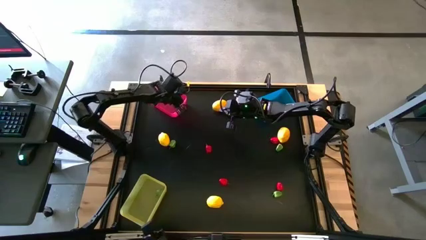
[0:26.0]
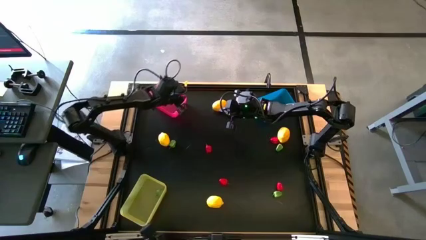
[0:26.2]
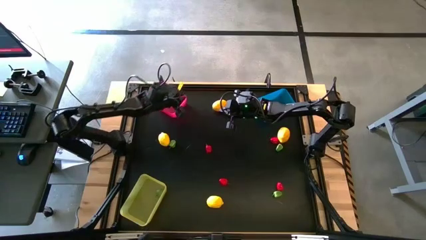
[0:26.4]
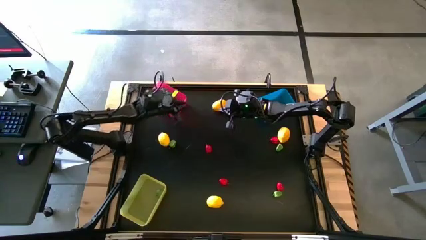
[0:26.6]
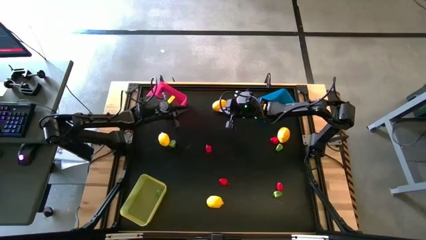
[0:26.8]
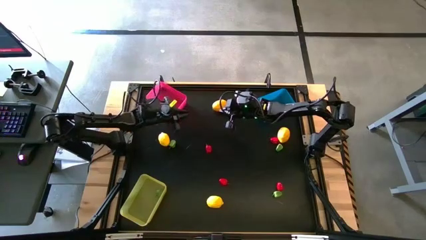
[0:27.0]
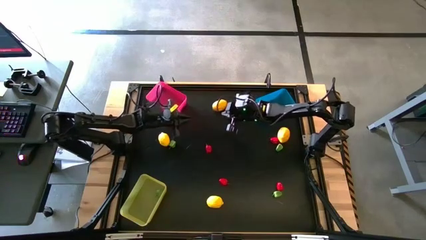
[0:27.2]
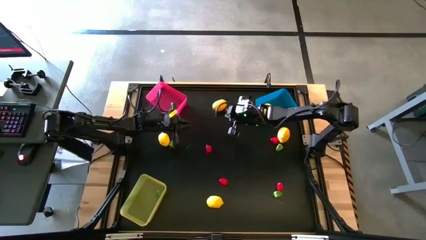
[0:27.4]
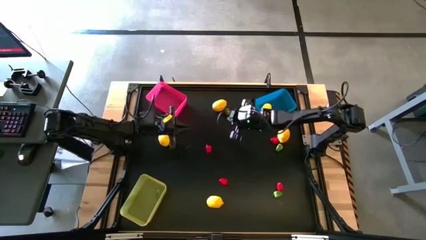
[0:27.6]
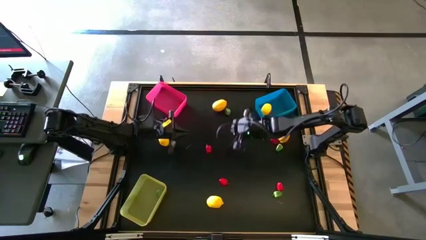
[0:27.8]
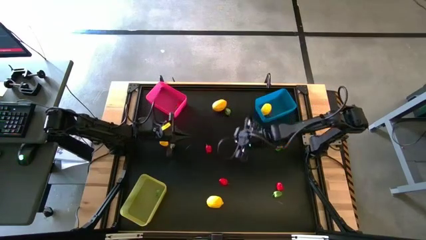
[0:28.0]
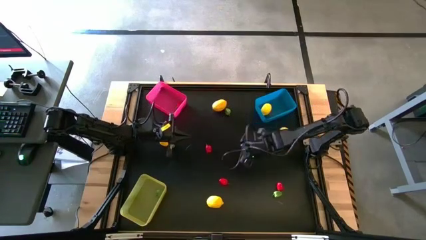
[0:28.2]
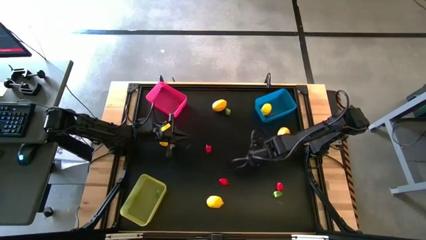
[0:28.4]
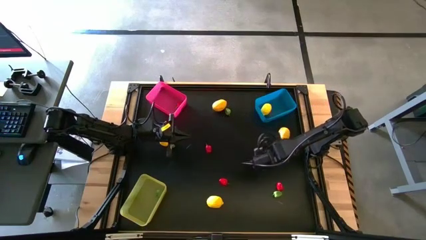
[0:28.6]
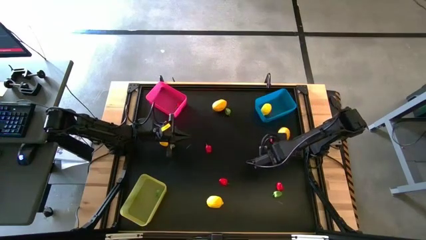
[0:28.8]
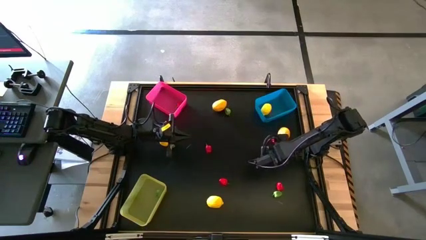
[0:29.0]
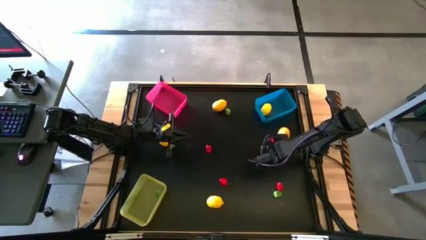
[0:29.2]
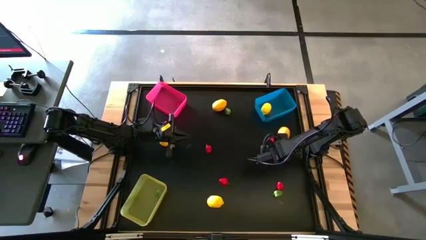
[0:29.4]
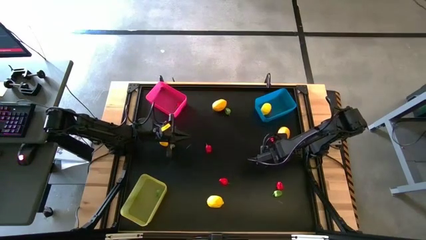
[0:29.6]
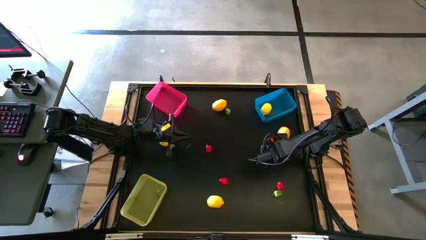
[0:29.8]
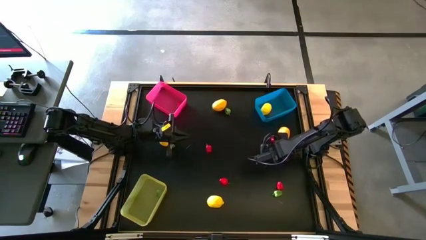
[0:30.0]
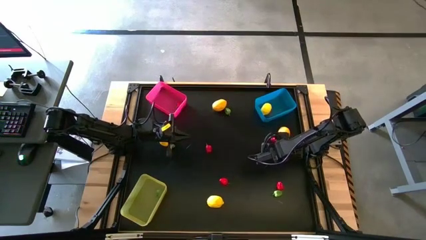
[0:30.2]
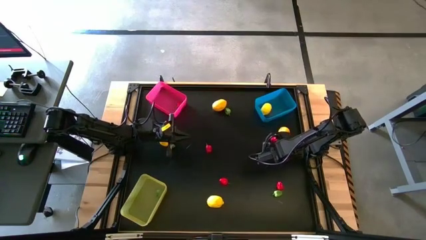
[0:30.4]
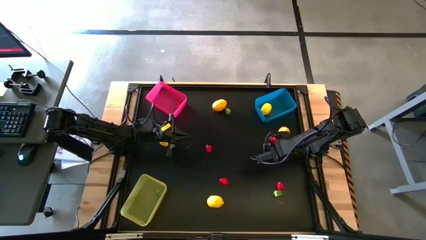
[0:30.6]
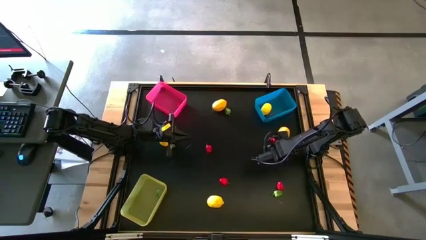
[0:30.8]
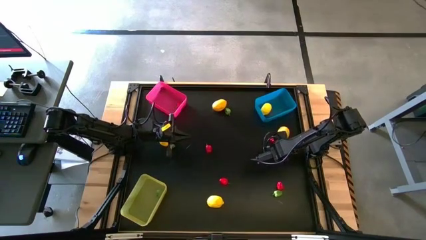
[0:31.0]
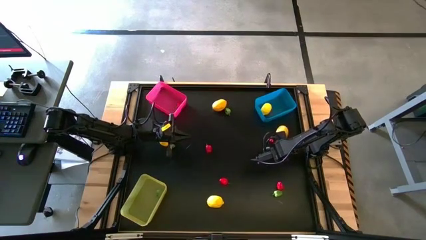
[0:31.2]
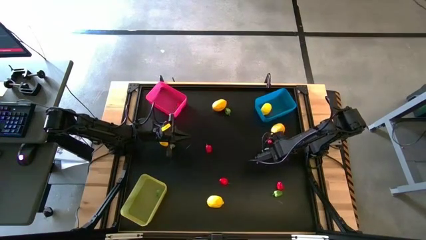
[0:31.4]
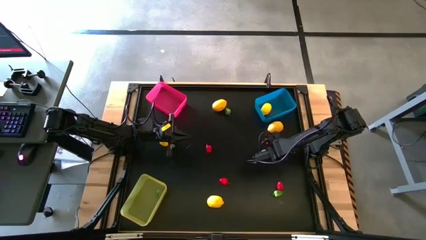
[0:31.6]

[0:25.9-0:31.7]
Task: Sort produce into baskets
Put the green bell pepper into the yellow bin

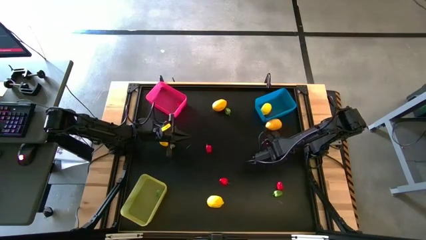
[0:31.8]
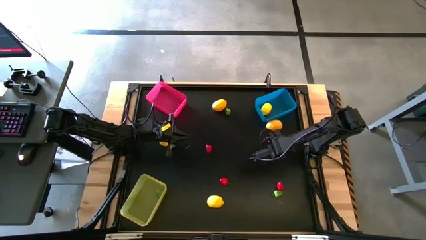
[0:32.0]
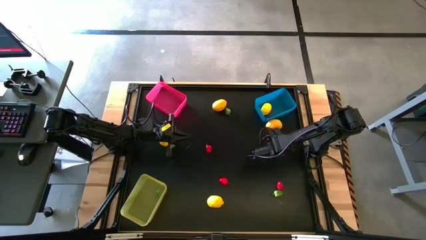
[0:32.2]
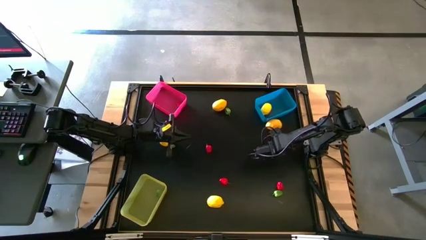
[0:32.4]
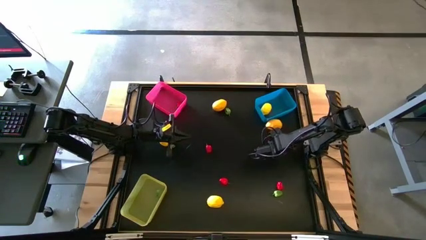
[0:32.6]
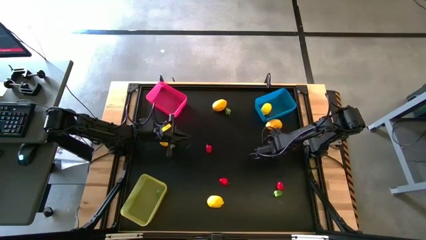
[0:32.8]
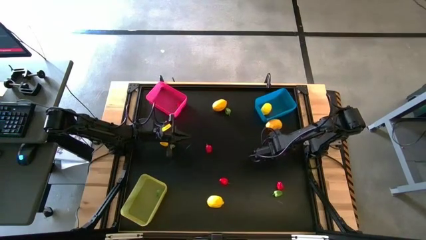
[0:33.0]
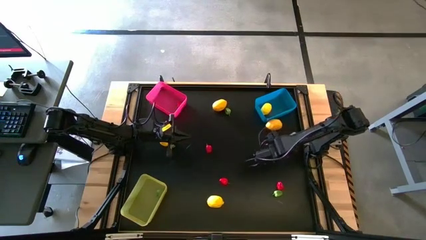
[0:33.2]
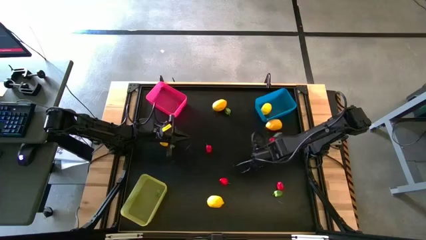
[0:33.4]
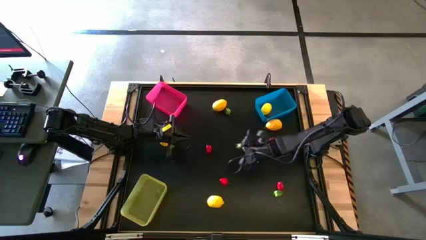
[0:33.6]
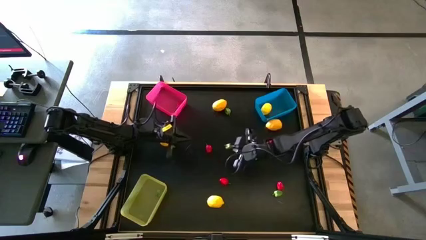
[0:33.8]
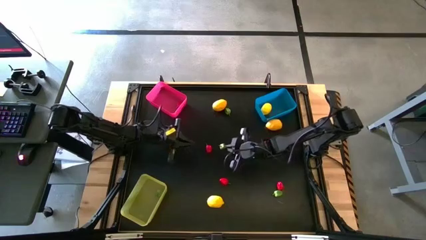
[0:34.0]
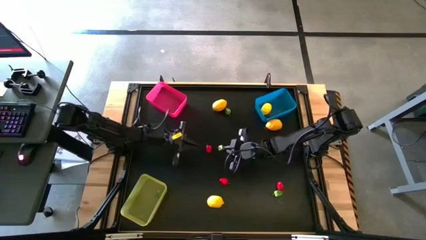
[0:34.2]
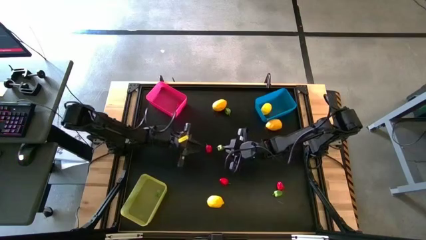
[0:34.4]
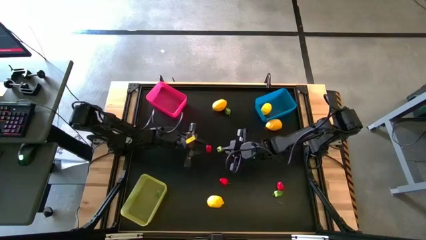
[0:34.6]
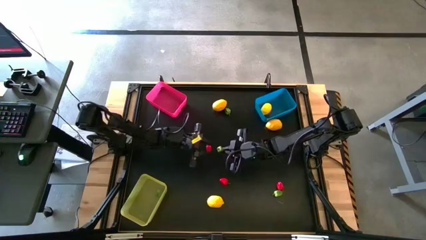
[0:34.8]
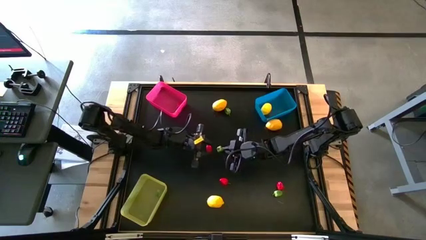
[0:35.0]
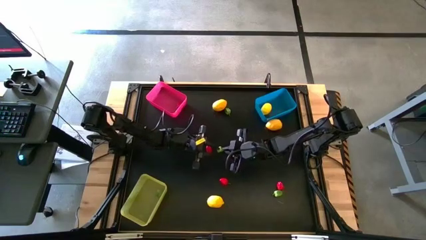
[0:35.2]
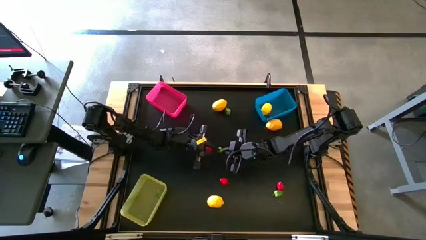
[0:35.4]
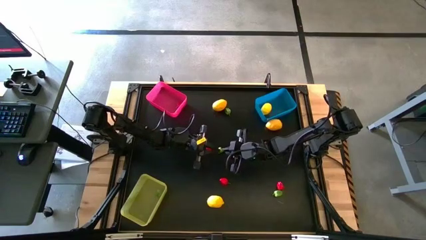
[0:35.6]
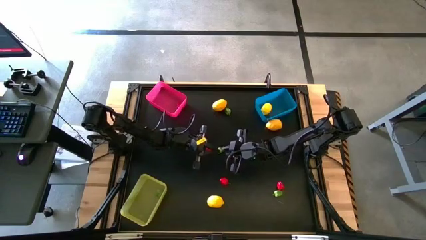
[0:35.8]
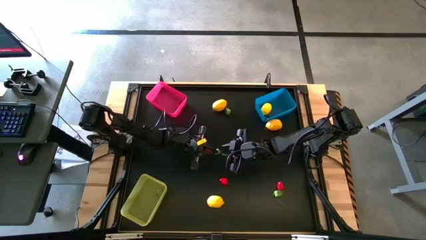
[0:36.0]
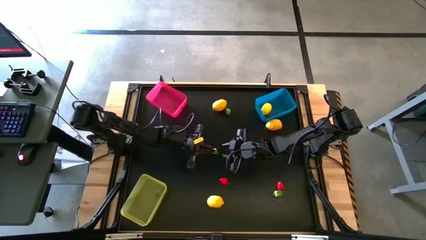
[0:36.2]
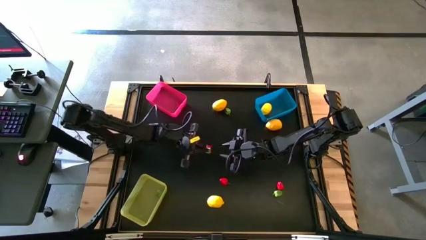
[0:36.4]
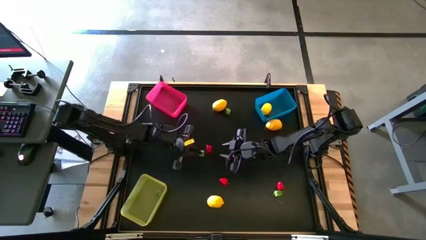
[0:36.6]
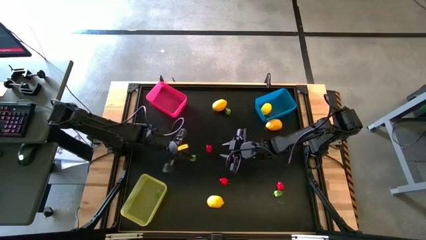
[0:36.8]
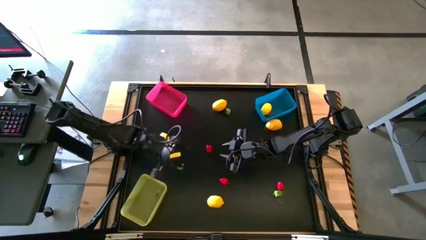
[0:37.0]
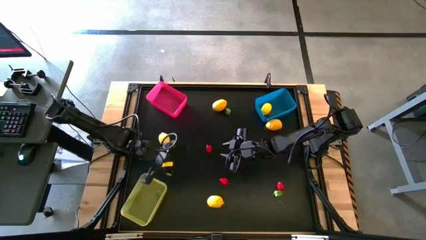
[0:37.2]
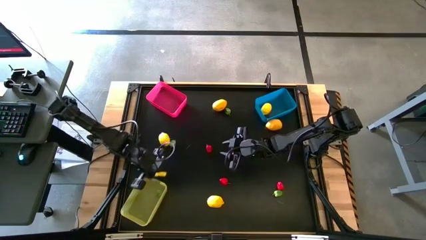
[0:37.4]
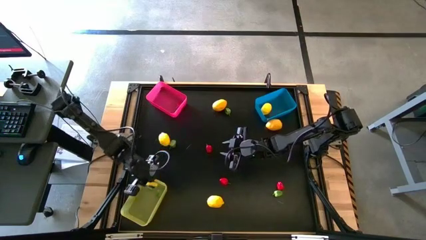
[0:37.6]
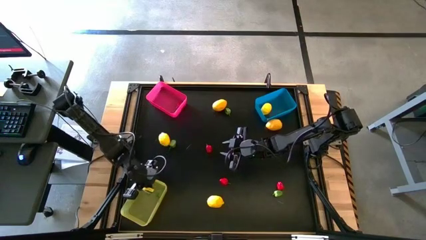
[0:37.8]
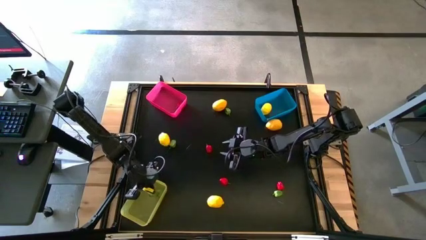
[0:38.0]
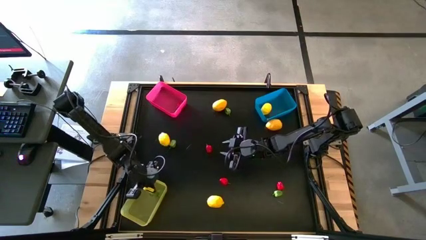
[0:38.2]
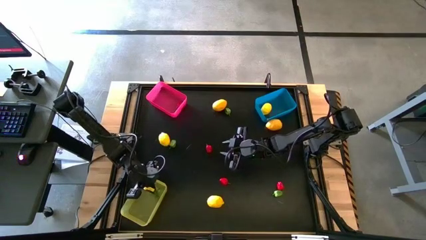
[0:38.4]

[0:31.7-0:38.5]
Put the green bell pepper into the yellow bin

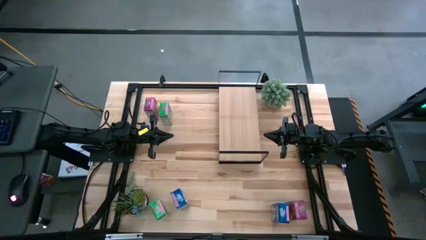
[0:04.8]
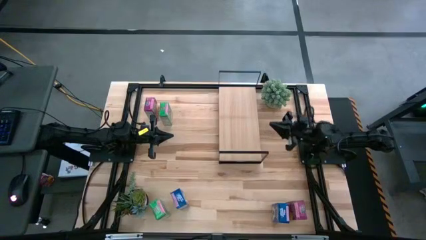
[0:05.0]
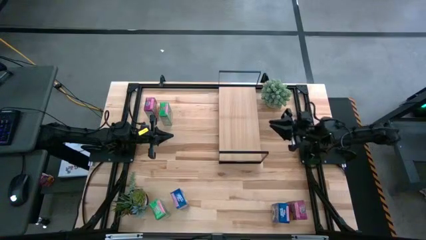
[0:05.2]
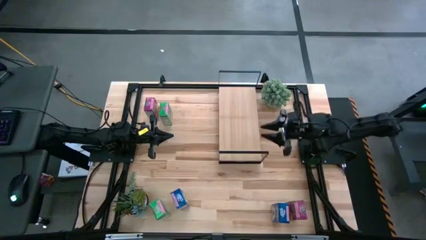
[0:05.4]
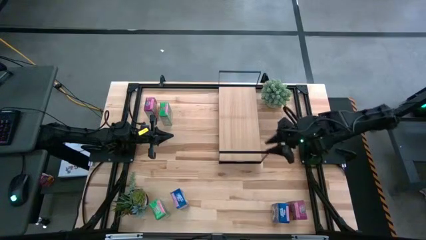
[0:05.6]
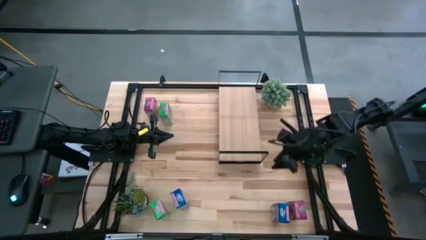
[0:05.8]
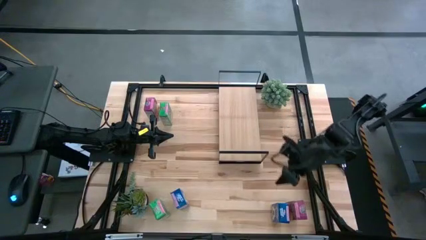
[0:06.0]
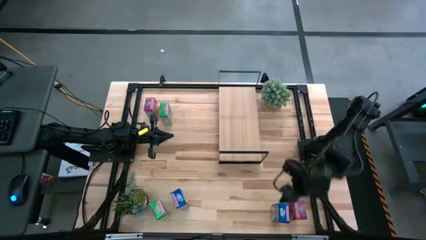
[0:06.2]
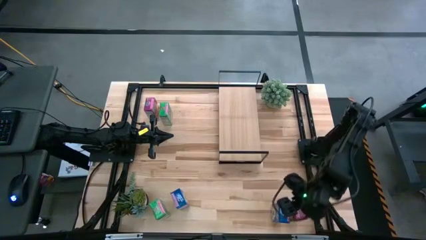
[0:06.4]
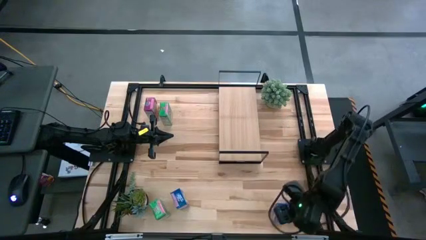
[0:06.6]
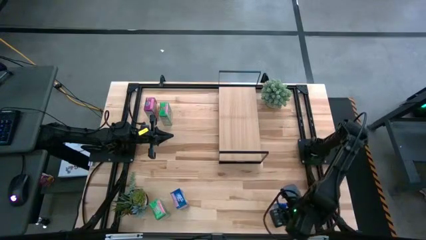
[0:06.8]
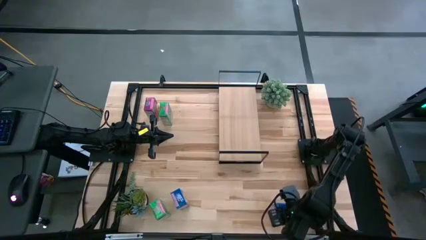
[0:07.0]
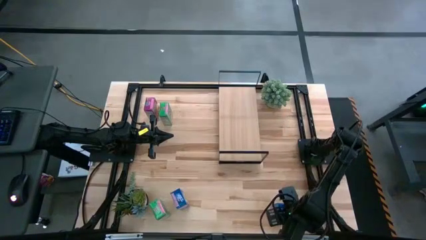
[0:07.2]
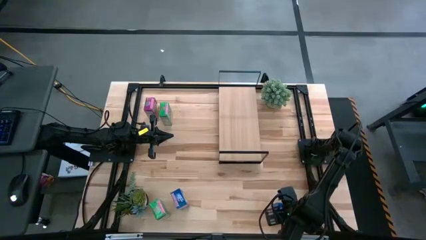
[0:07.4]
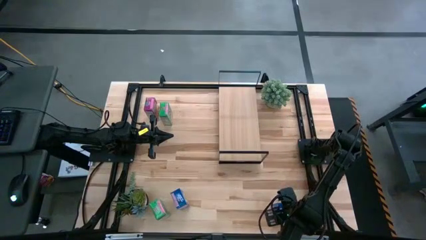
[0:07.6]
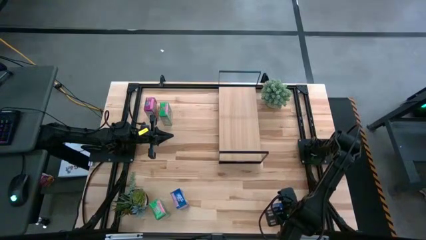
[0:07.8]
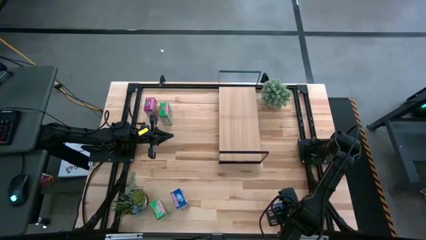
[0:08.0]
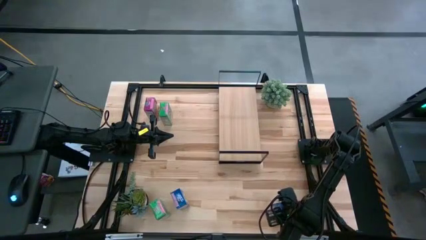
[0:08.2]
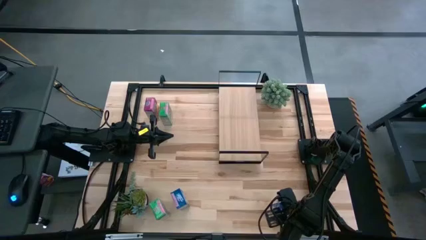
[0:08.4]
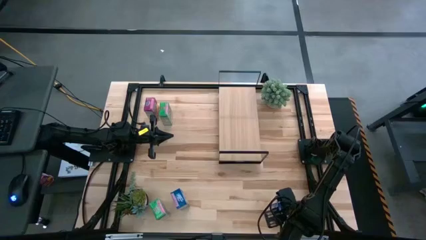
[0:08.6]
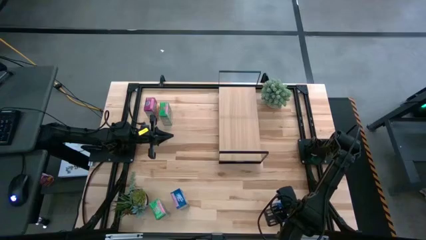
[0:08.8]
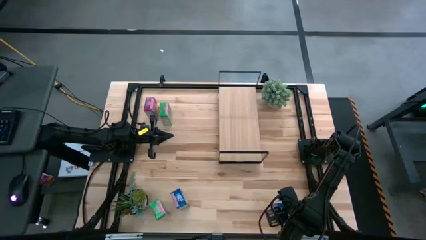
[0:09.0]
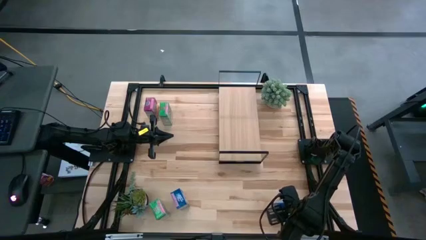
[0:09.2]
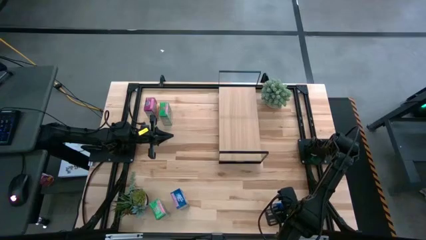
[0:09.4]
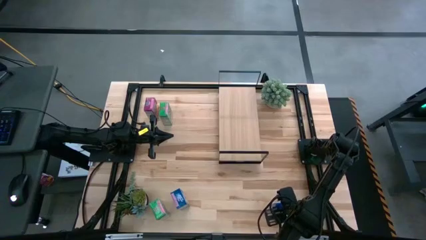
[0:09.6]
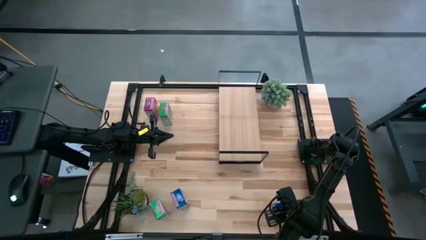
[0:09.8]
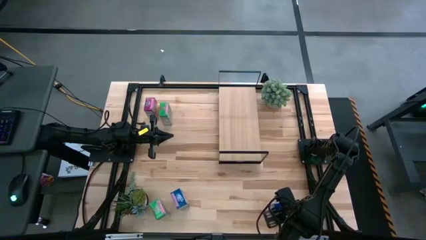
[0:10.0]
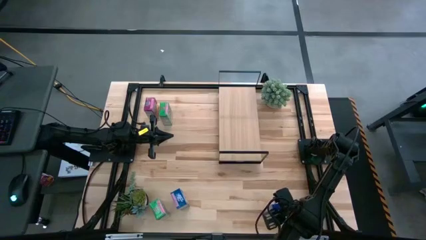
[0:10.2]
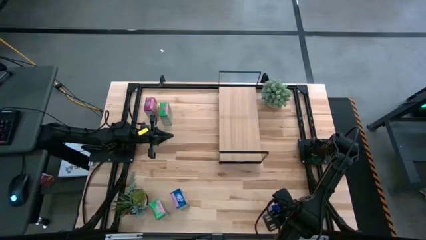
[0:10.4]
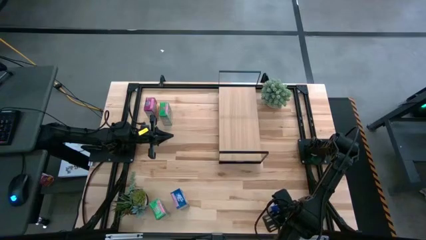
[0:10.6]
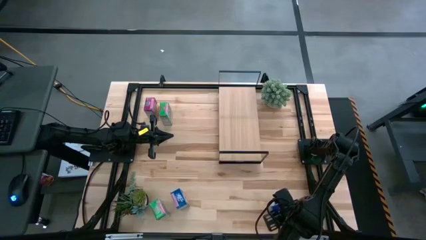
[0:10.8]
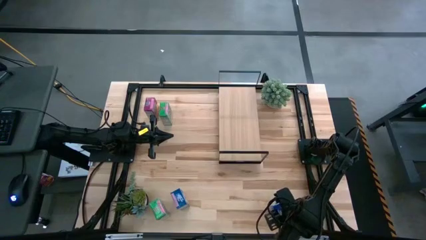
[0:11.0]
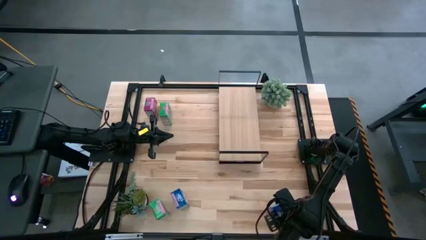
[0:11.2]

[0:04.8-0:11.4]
Task: Stack cereal on shelf
Put the right blue cereal box on the shelf
